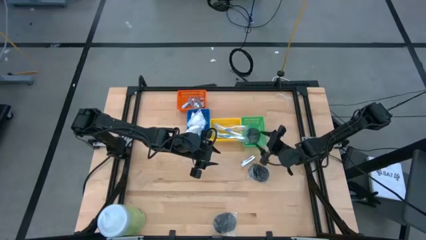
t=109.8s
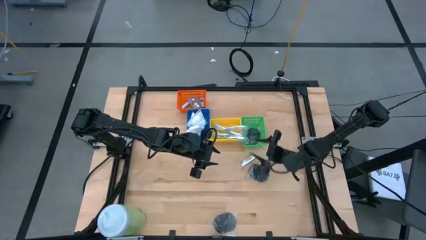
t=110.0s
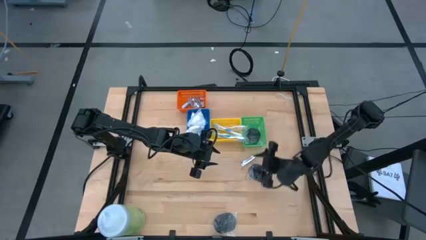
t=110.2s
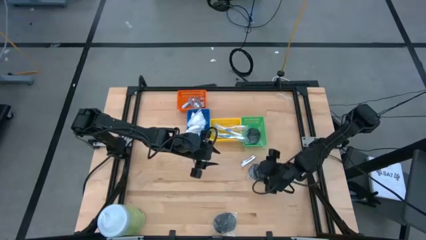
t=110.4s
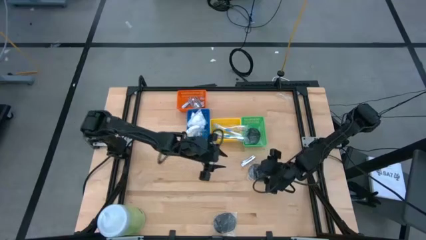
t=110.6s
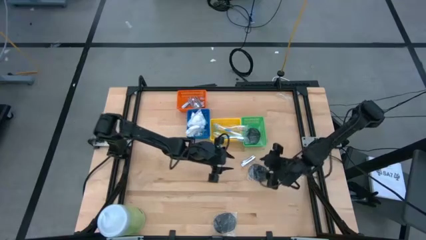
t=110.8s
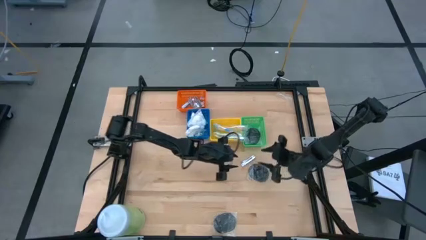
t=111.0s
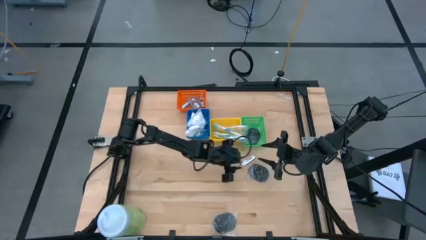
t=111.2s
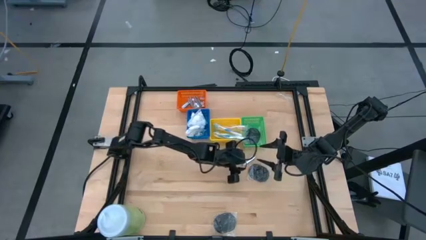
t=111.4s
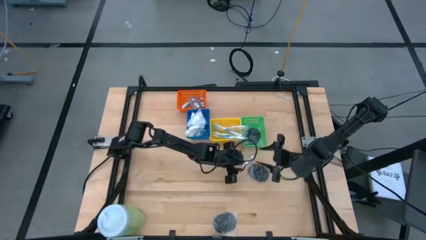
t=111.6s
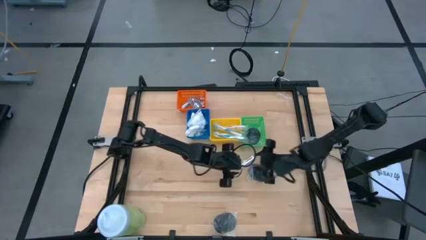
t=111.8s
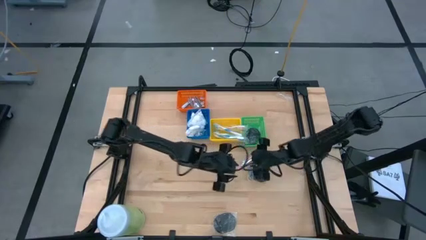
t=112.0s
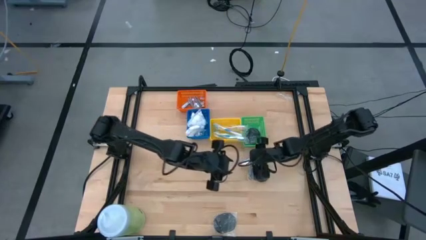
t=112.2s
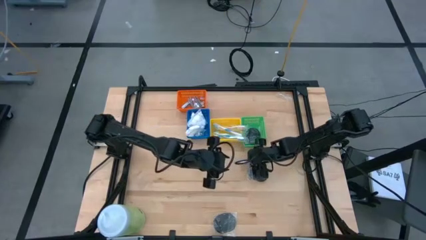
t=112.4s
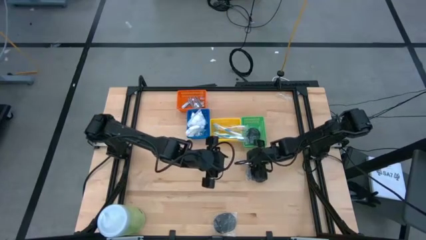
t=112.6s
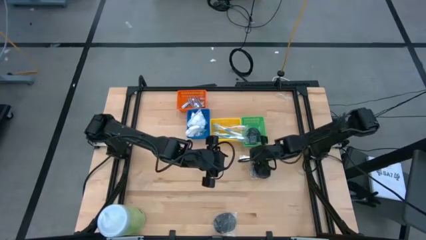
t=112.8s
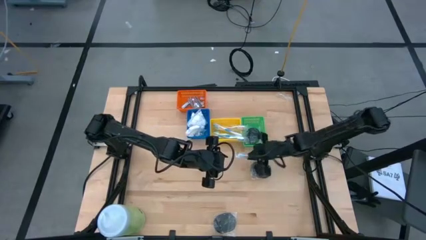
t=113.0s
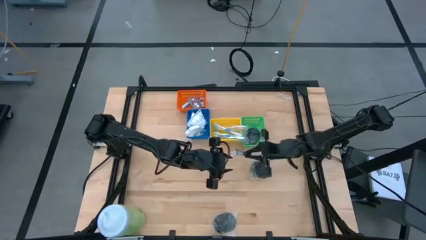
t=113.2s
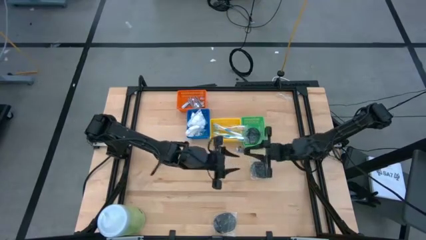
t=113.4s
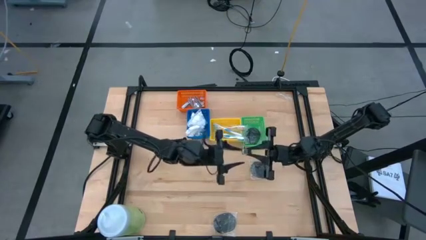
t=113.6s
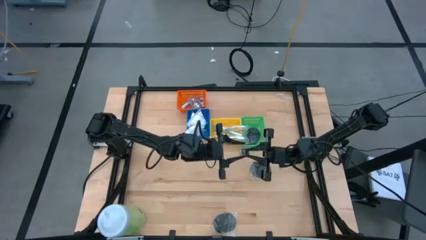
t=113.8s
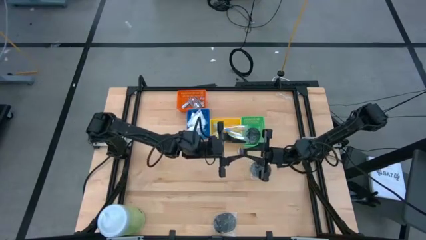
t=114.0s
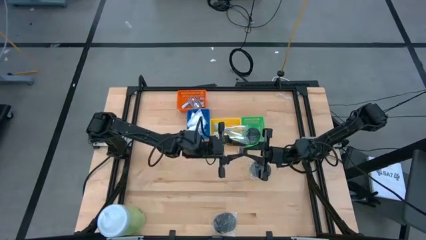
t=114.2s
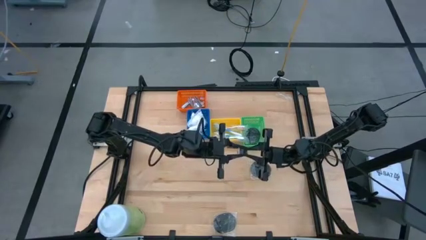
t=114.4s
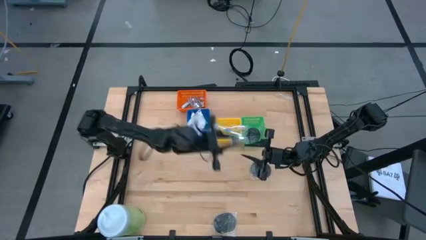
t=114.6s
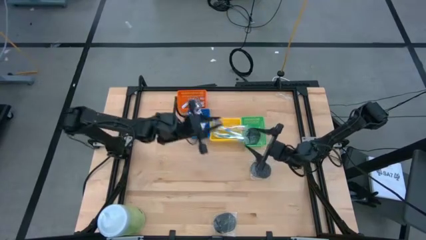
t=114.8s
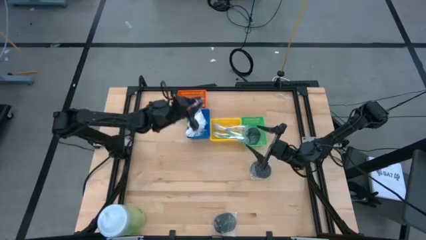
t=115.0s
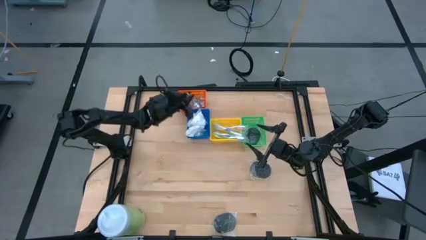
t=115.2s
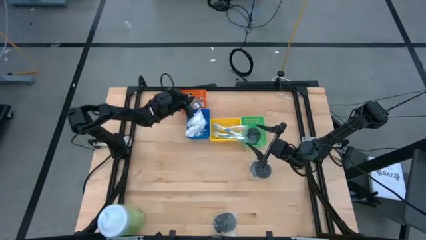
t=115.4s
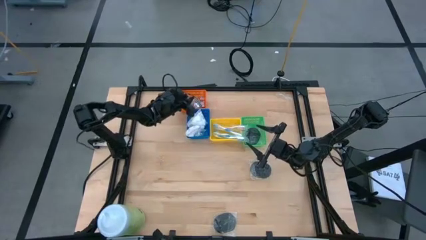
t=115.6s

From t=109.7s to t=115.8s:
Task: Pick & Place Travel size toiletries
Put the nail cutter into the orange basket

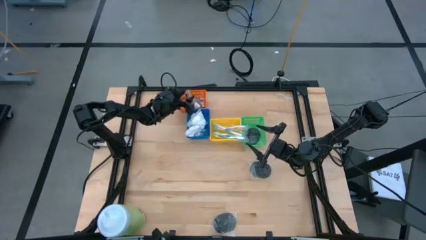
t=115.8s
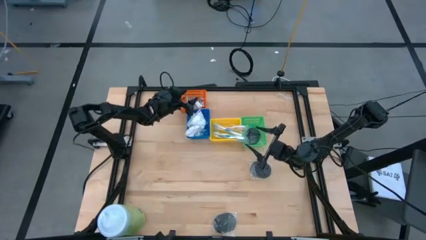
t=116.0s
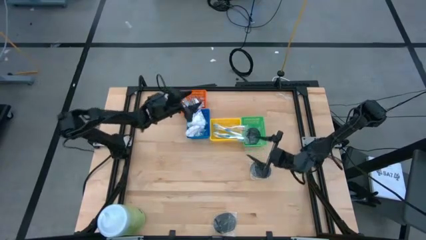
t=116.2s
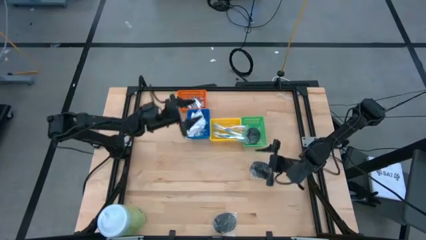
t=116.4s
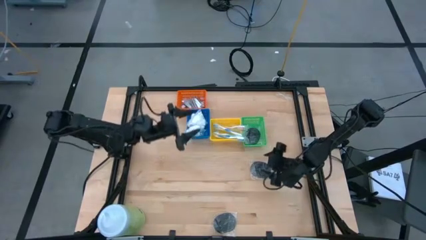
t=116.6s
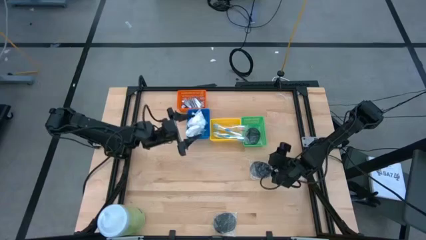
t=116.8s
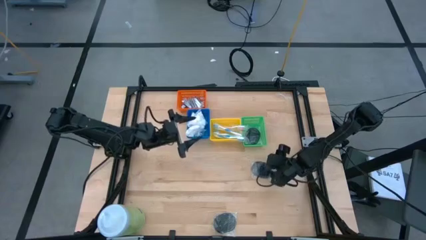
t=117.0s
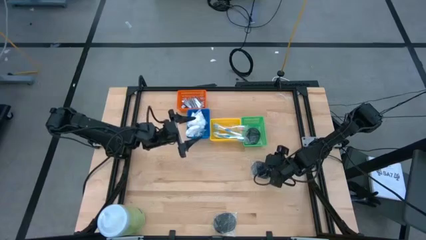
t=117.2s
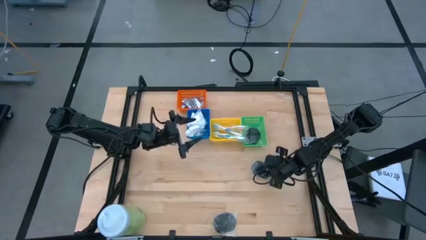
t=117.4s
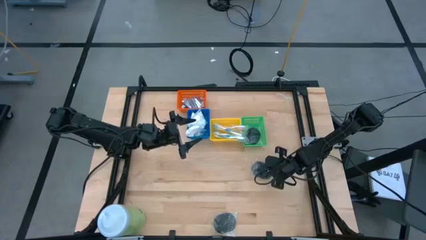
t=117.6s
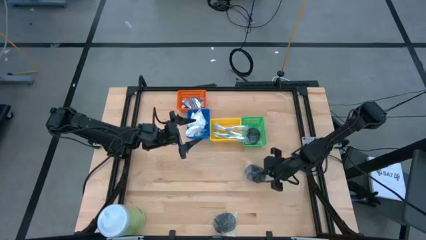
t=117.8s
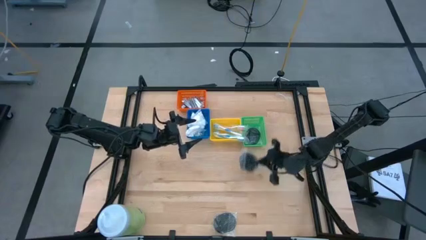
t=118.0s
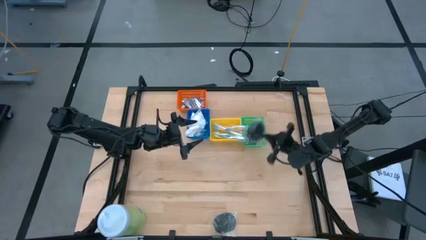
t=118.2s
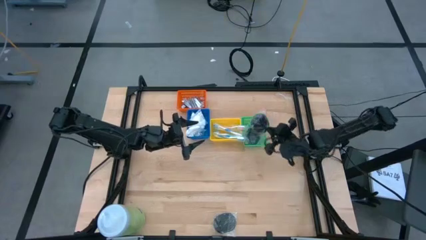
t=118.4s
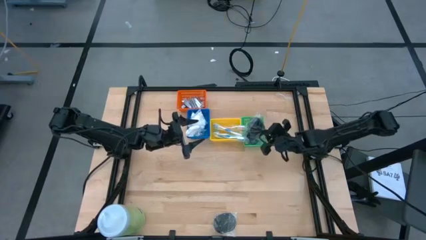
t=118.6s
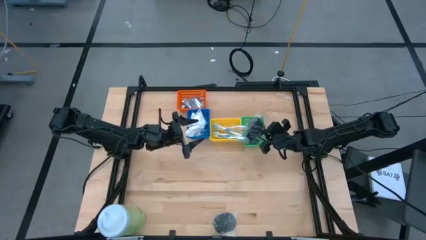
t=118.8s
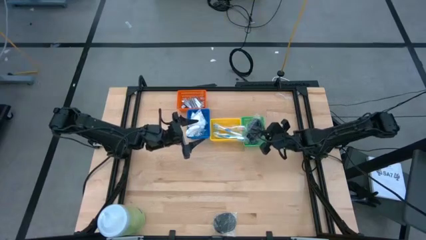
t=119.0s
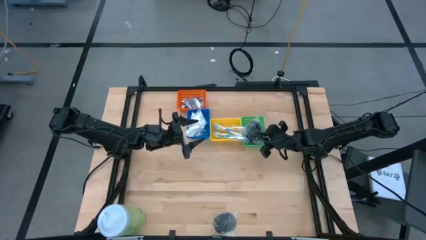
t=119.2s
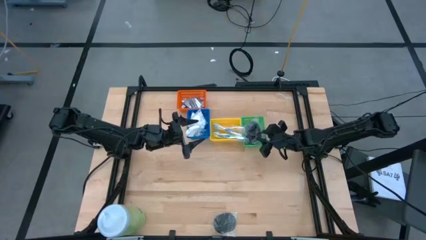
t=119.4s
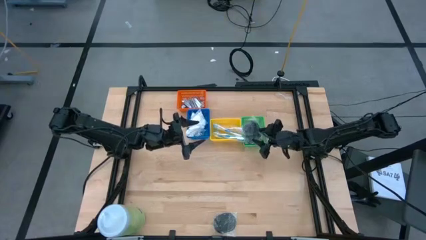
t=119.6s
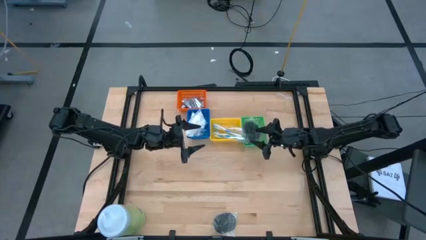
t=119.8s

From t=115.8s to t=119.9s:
Put the top black hairbrush into the green basket

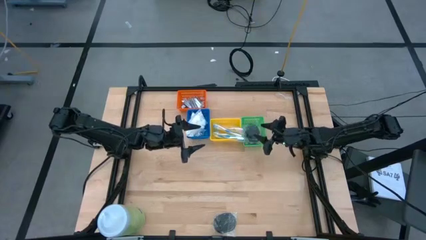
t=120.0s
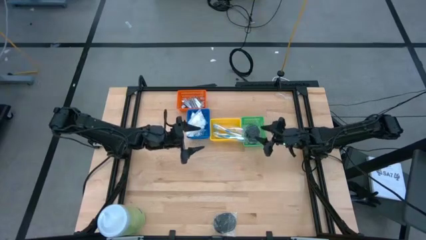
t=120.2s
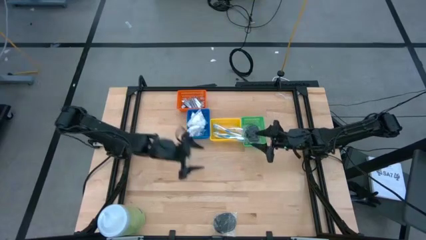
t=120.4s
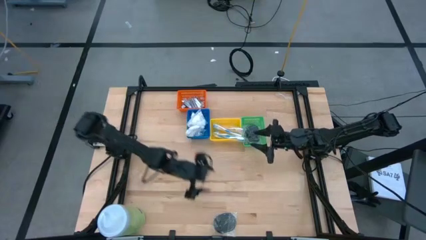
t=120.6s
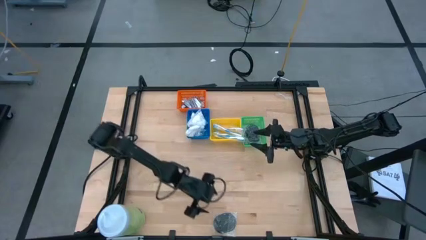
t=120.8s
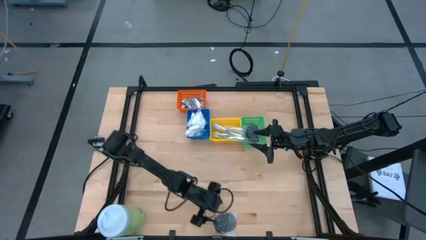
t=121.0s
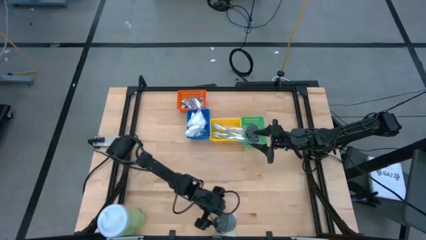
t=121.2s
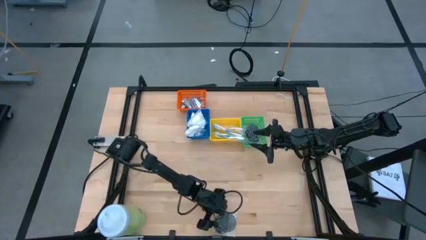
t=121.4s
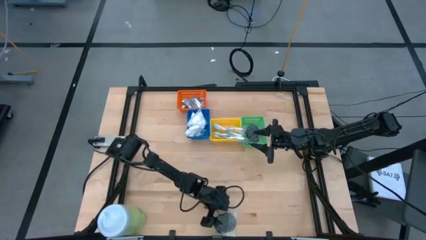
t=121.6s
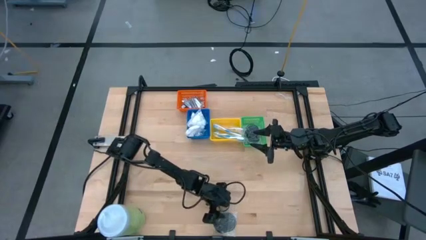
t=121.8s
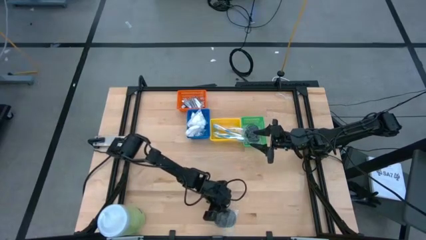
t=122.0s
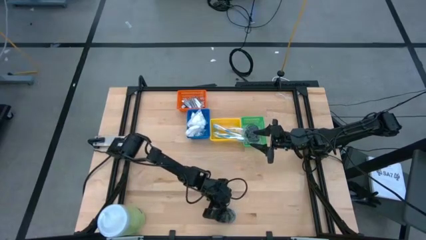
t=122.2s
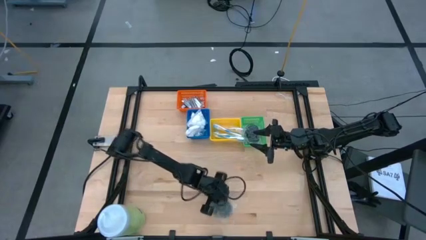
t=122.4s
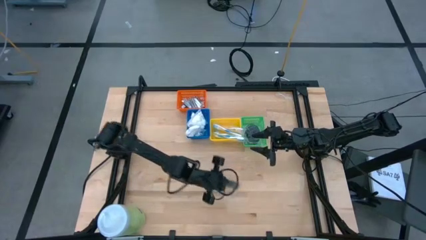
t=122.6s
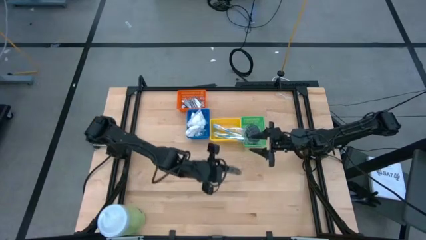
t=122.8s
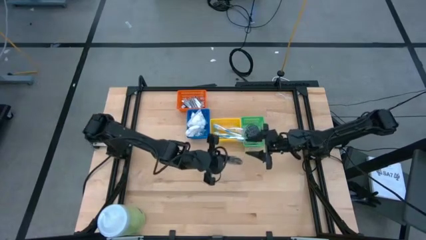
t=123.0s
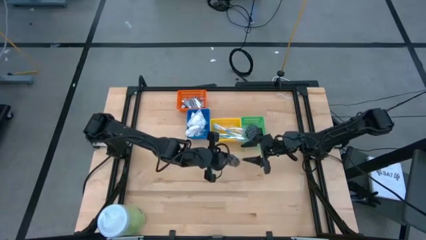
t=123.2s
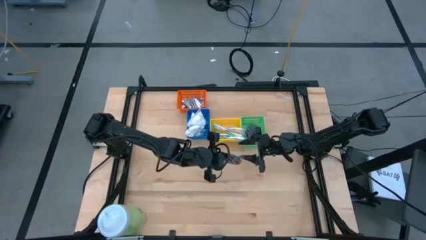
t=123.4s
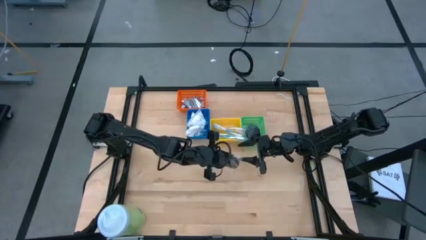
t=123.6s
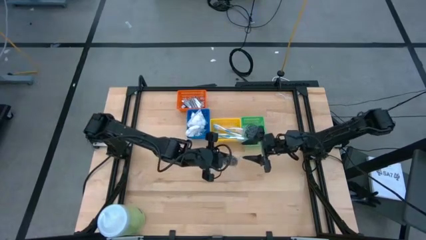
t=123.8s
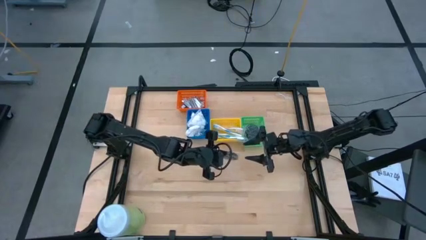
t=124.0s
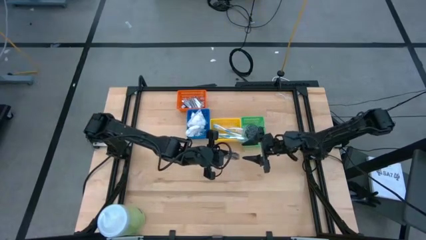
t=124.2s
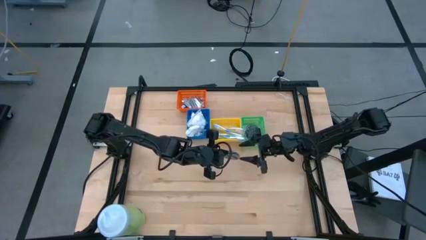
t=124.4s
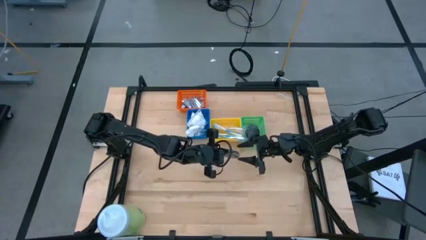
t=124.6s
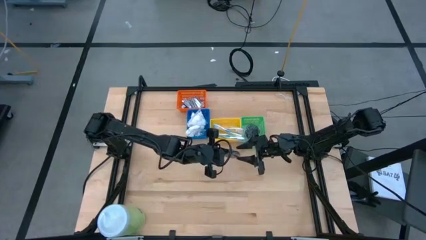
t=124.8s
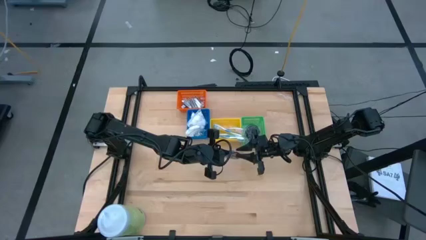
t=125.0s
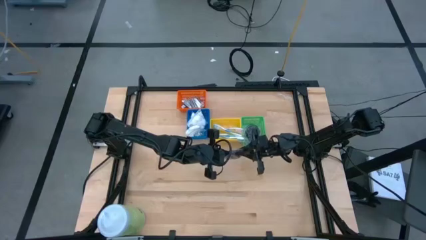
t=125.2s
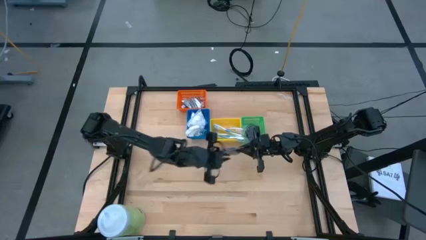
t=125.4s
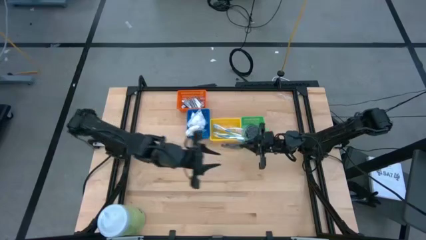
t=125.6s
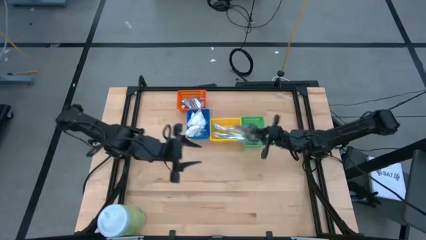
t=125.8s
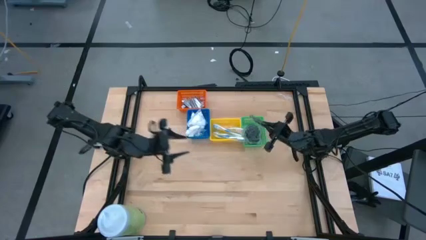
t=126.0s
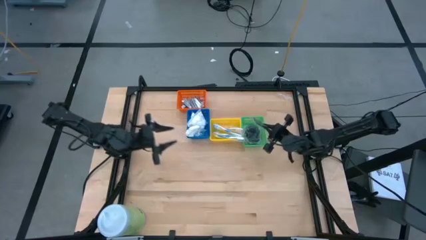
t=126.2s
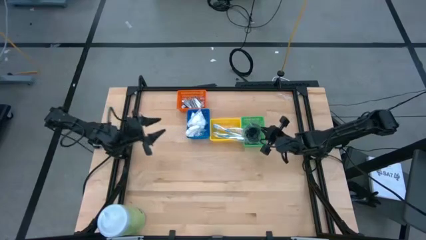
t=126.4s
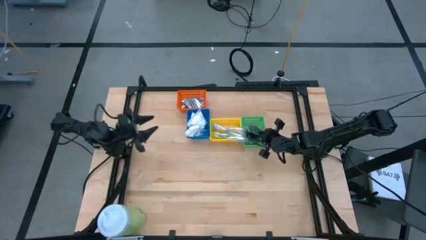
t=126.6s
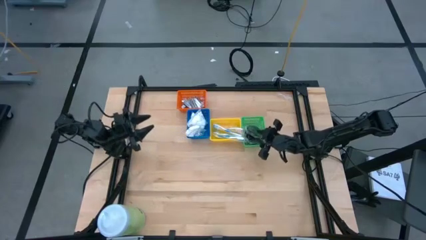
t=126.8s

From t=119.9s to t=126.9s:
Put the black hairbrush into the green basket

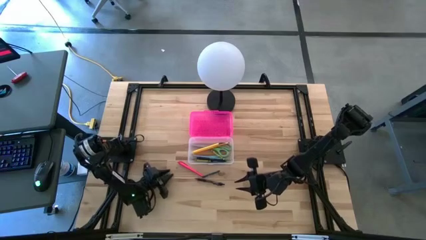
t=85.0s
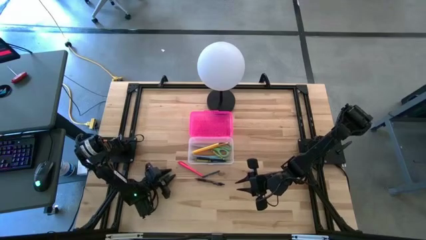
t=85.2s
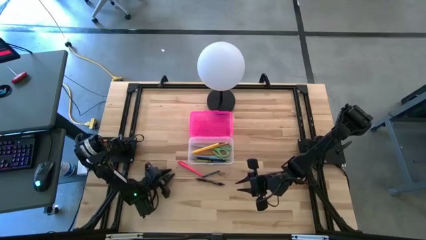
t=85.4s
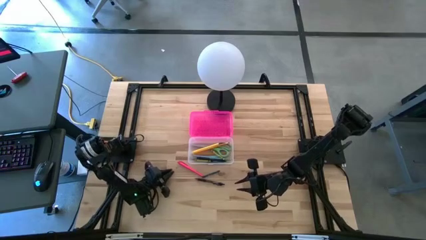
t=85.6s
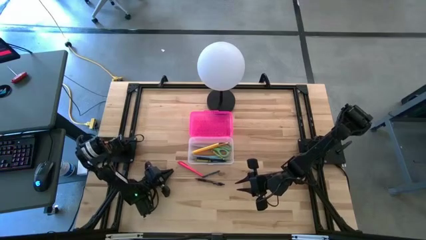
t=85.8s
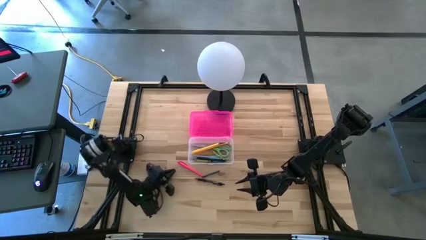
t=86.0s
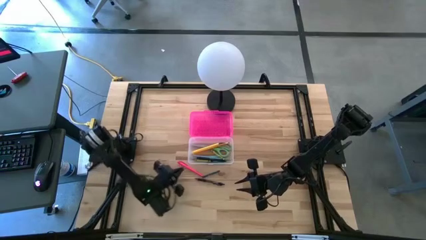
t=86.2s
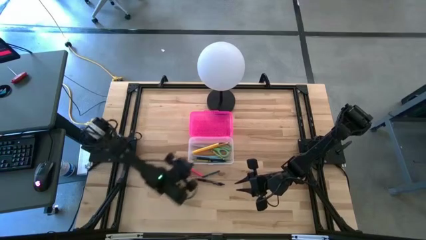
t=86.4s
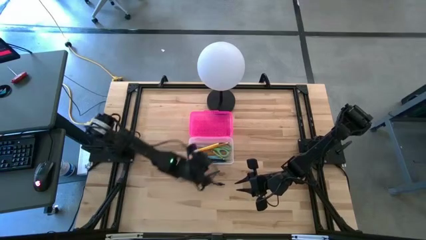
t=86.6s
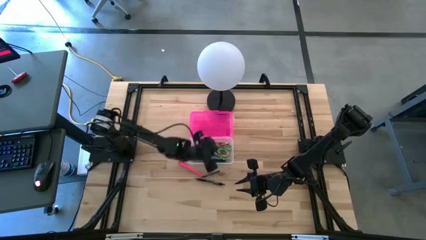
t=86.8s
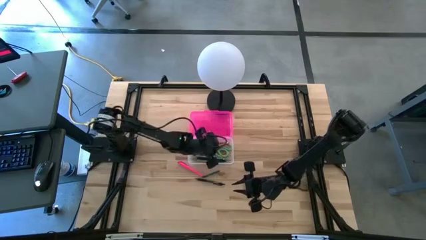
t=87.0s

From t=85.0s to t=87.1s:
Task: Pick & place school supplies into a supply box
Put the bottom green crayon into the pink supply box
